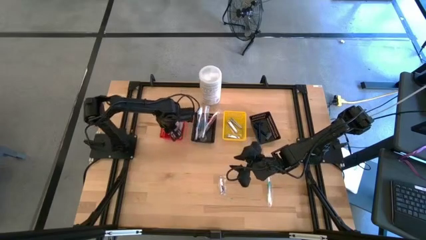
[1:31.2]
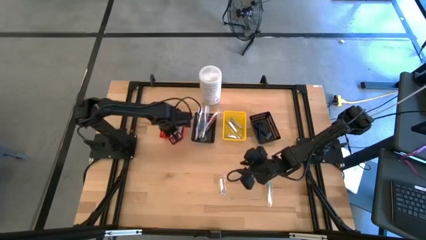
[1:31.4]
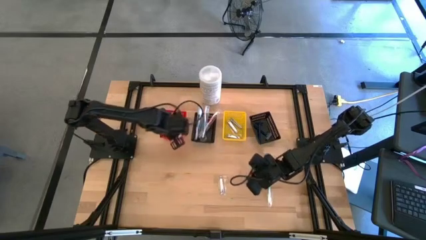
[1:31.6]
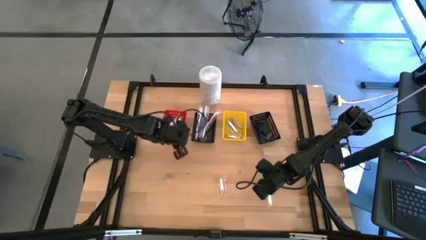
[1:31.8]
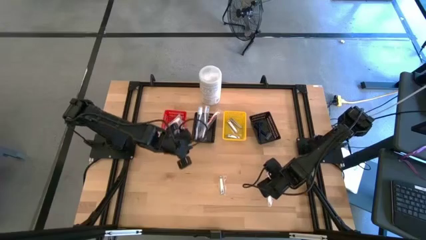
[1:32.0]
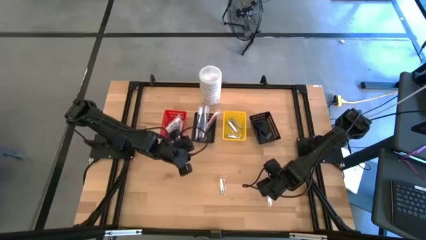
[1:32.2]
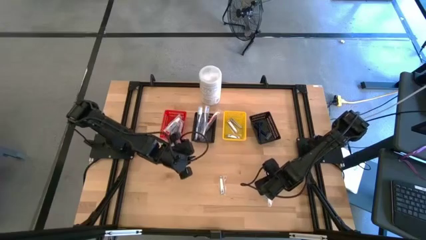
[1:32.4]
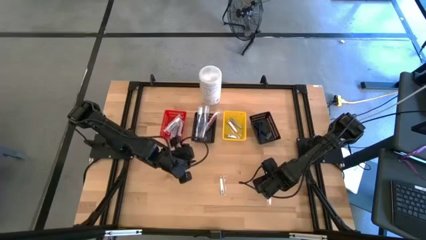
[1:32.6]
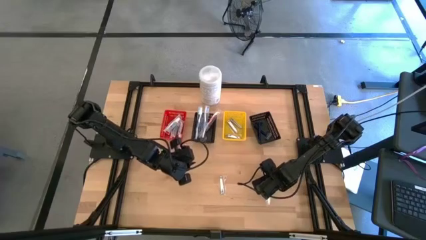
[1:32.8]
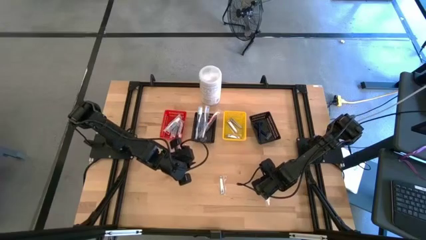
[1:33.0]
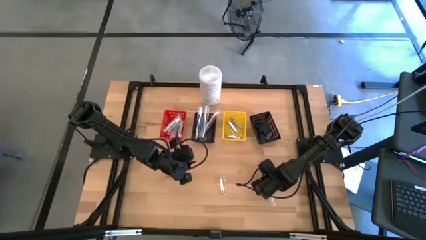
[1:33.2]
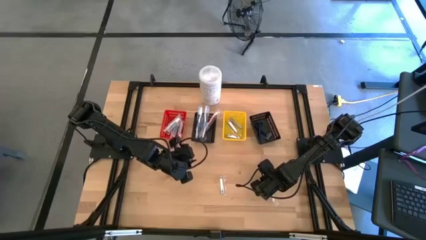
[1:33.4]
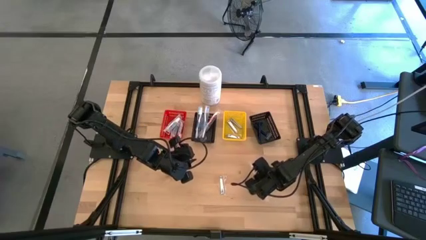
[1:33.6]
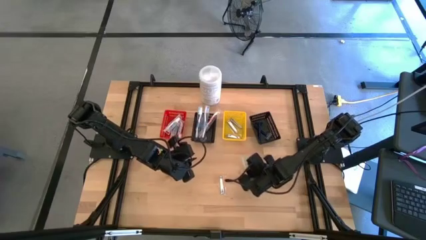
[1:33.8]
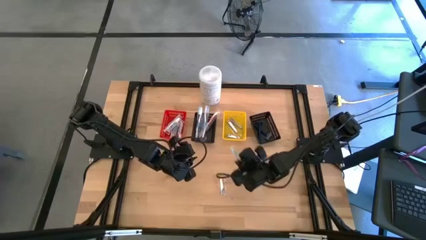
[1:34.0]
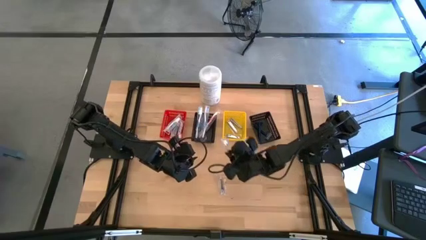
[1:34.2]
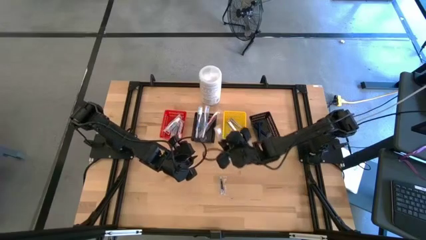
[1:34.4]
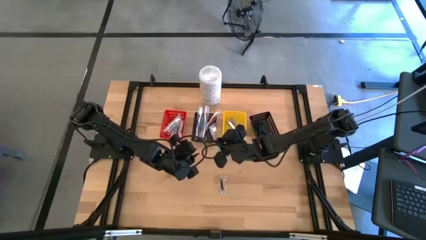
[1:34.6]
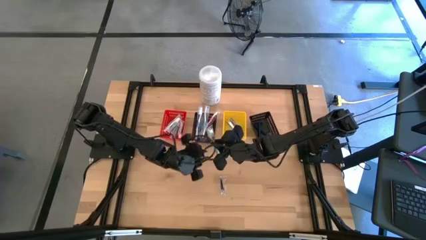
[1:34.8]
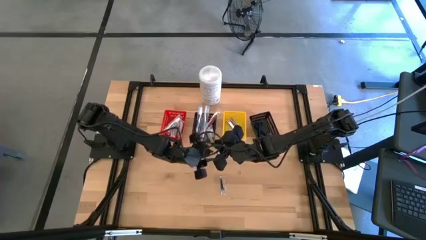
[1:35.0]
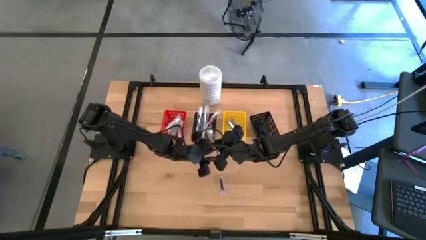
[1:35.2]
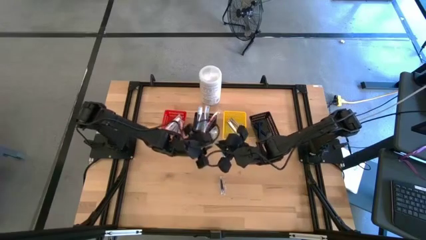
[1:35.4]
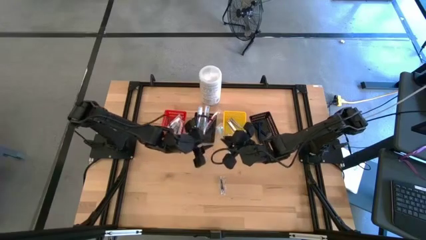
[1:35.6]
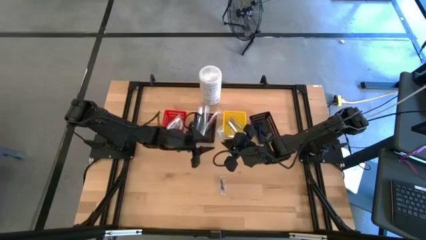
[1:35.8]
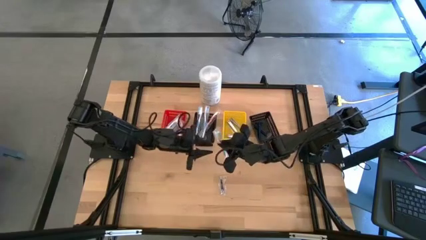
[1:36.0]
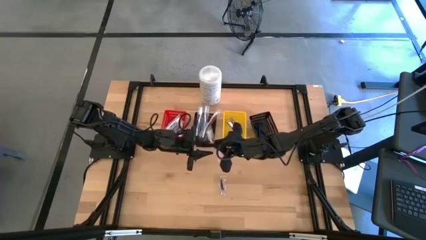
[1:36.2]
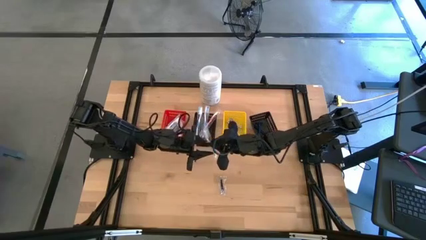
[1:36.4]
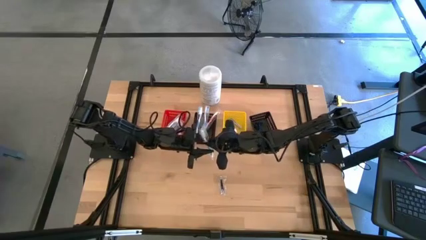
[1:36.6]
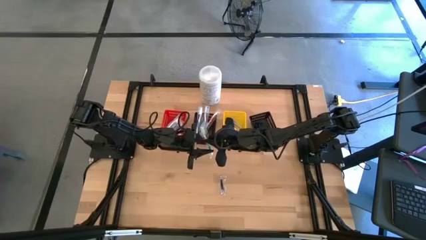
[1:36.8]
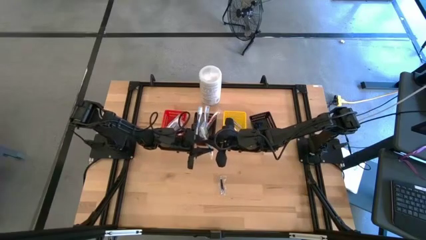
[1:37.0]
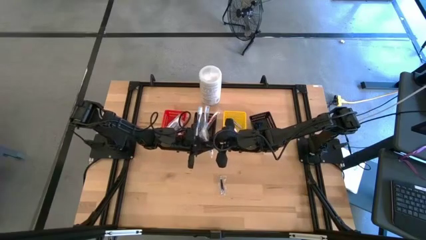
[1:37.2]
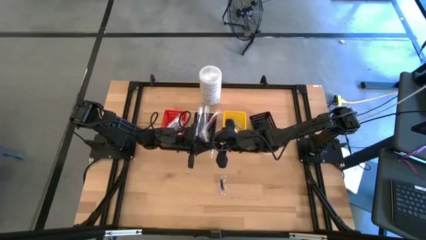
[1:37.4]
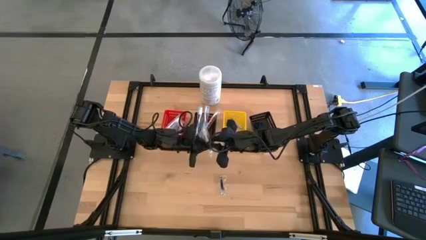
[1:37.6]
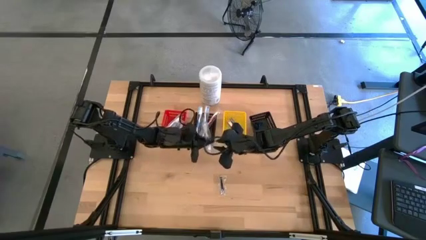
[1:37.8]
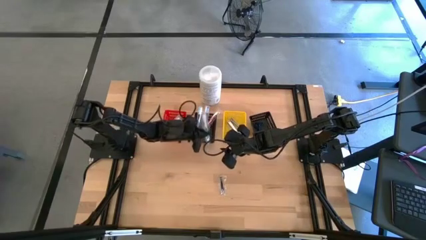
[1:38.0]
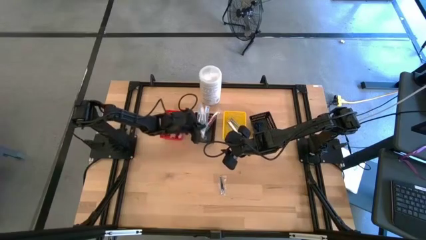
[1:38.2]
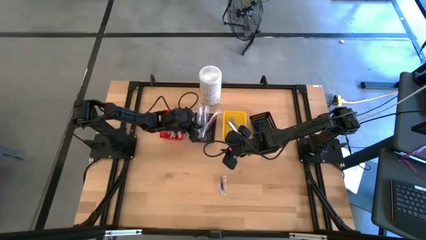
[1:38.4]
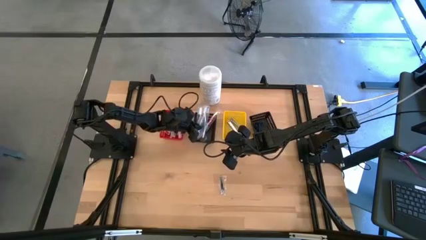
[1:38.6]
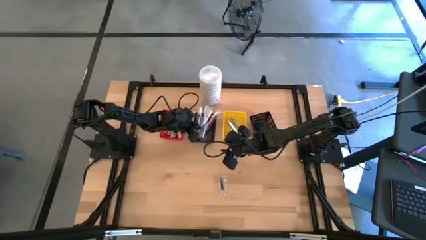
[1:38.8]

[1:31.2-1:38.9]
Task: Pick & Place Travel size toiletries
Put the green toothbrush into the left black basket

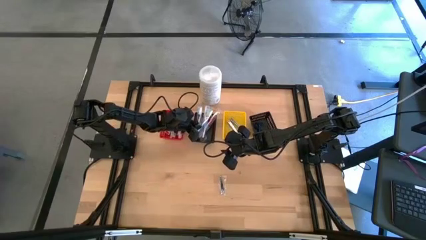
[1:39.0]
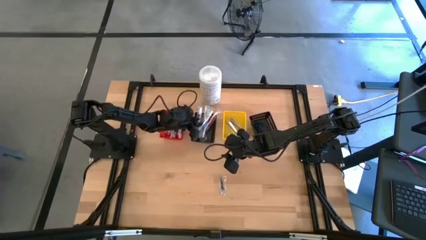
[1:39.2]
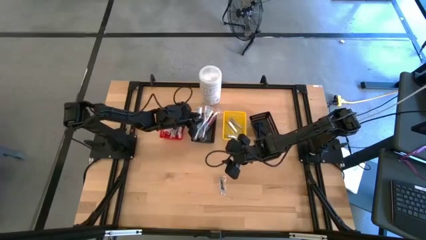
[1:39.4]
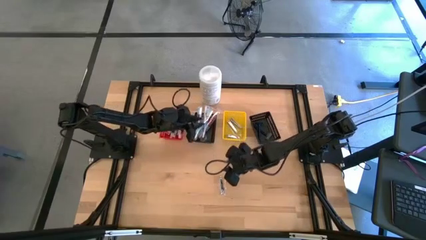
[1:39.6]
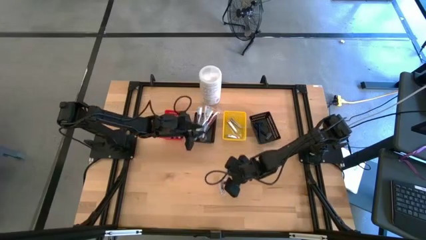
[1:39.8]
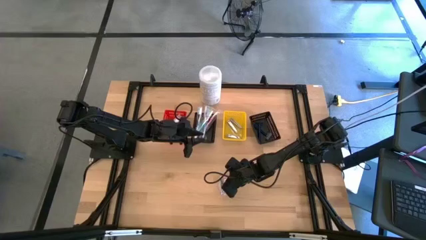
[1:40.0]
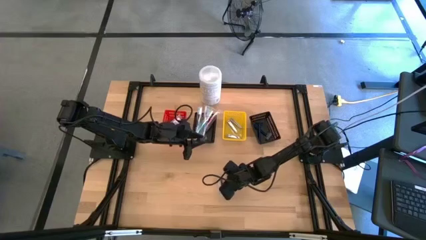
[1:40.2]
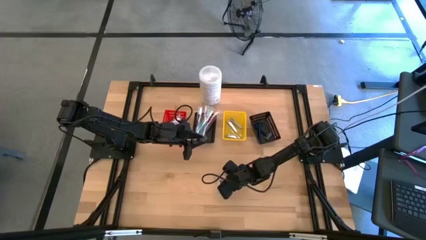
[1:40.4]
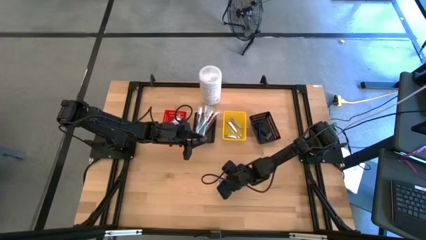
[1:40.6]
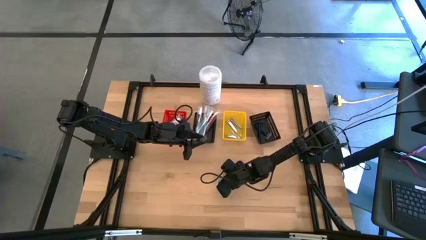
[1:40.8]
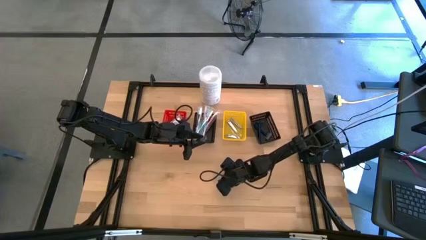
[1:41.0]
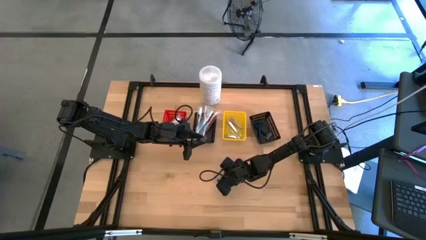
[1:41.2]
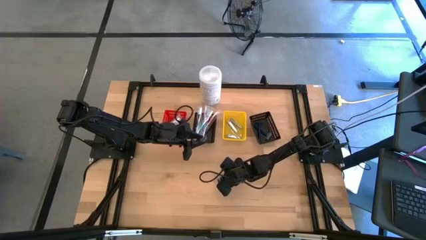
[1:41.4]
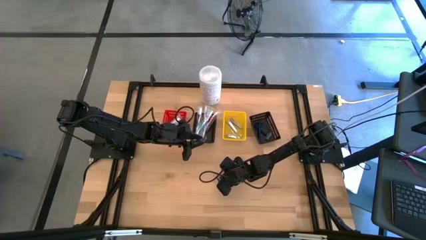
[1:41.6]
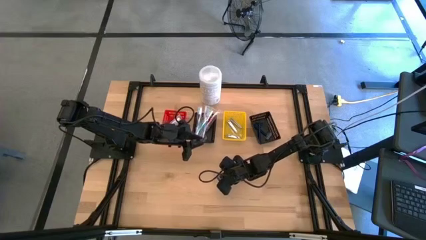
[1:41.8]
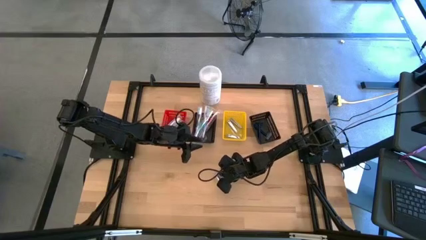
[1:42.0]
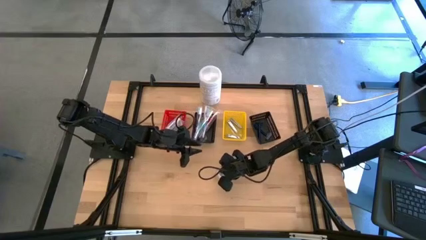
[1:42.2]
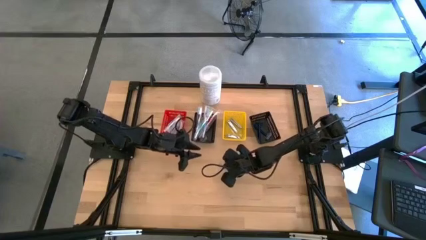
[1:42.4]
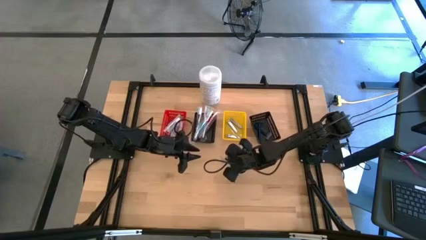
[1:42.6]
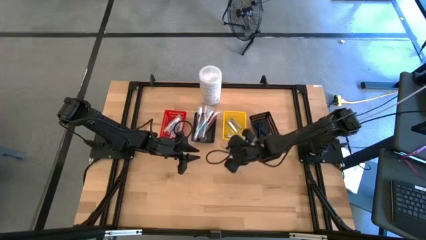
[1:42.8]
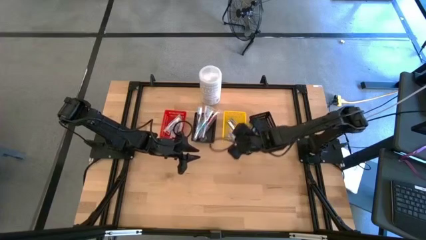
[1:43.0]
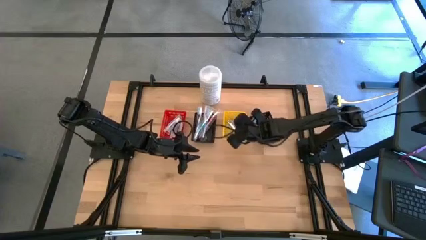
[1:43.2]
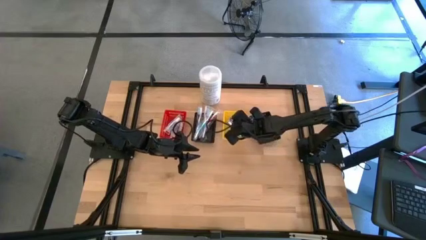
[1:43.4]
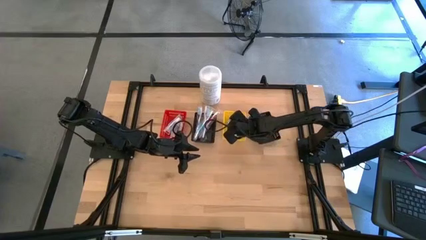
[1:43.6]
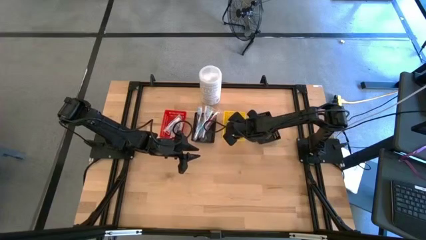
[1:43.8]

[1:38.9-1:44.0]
Put the nail cutter into the yellow basket

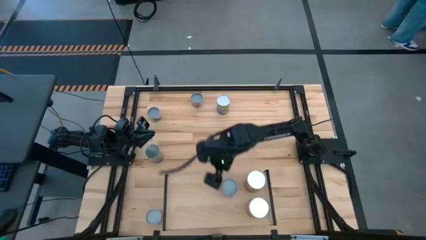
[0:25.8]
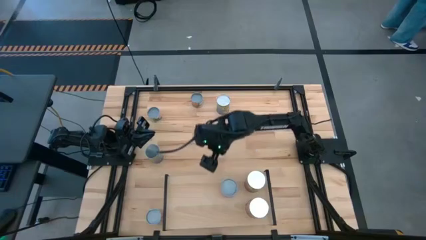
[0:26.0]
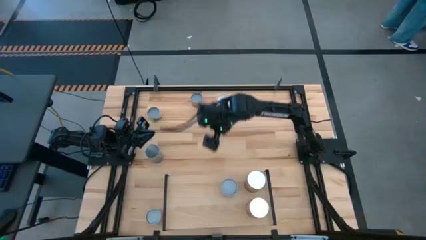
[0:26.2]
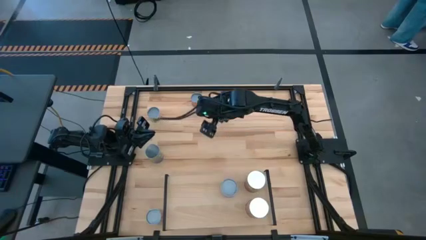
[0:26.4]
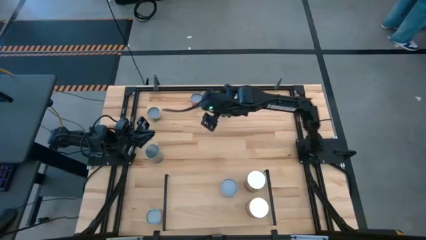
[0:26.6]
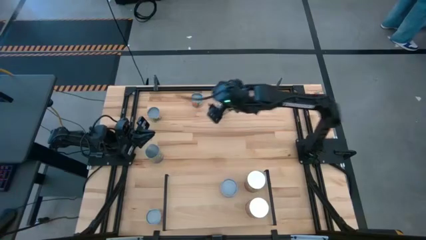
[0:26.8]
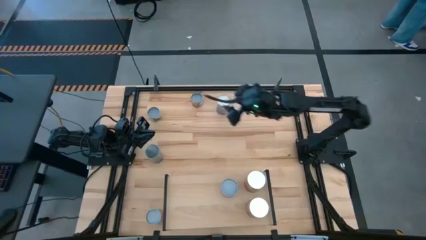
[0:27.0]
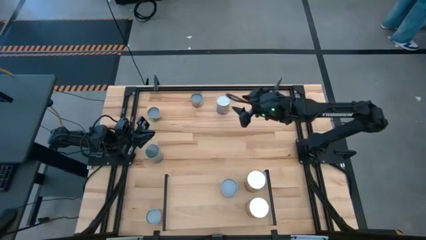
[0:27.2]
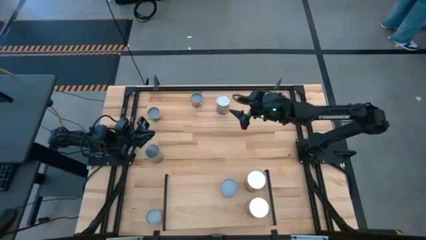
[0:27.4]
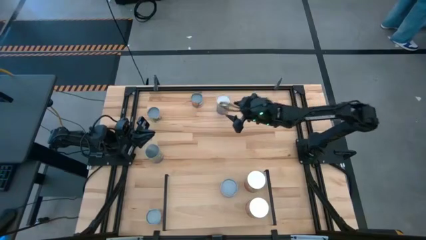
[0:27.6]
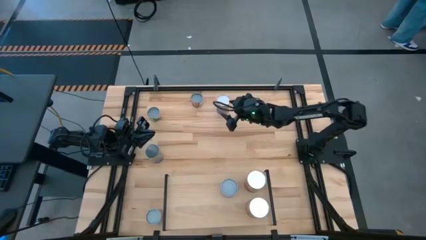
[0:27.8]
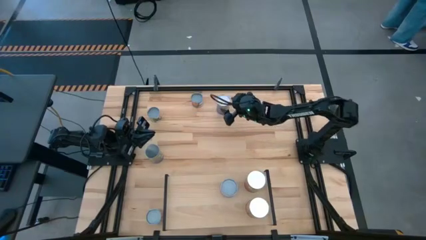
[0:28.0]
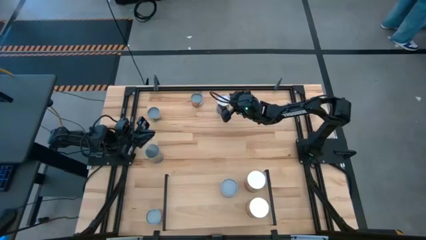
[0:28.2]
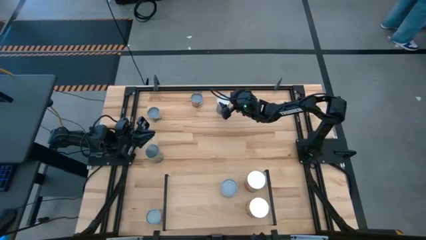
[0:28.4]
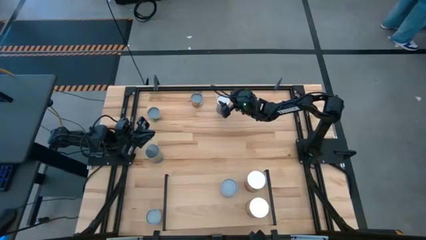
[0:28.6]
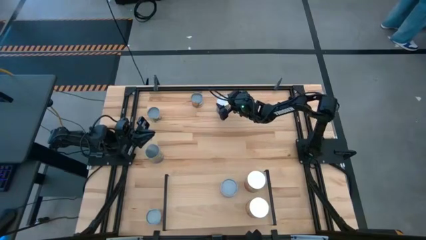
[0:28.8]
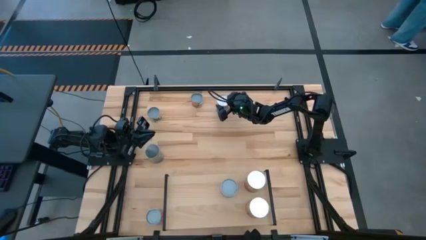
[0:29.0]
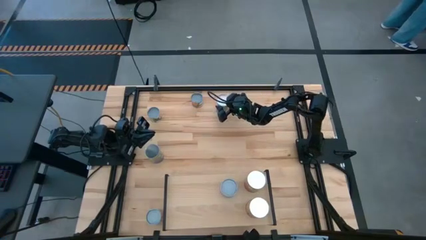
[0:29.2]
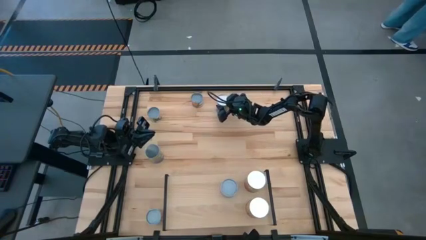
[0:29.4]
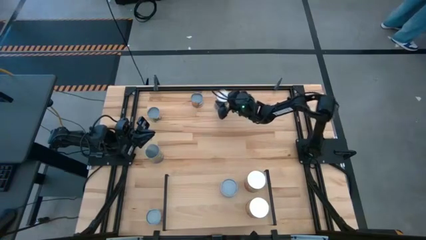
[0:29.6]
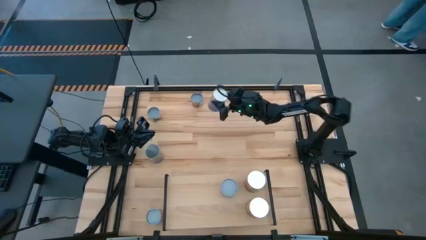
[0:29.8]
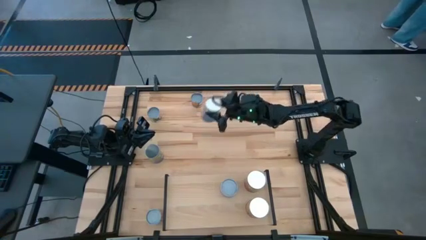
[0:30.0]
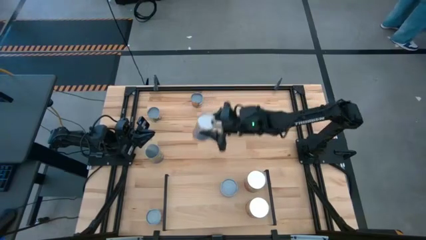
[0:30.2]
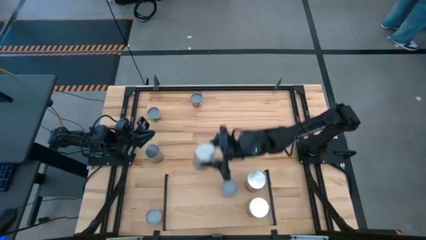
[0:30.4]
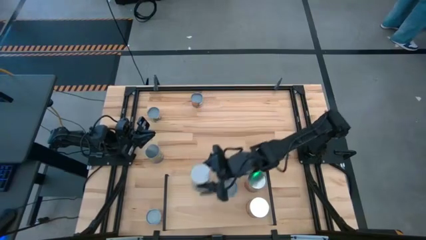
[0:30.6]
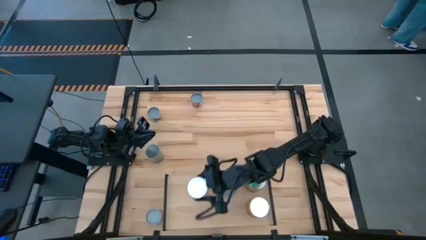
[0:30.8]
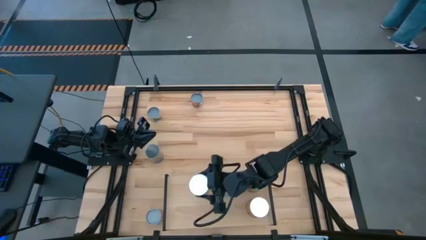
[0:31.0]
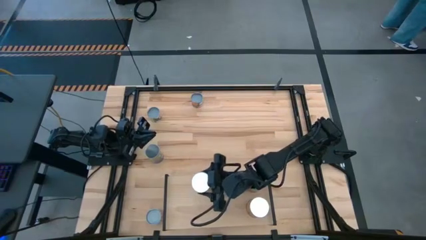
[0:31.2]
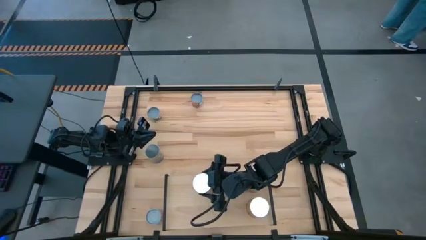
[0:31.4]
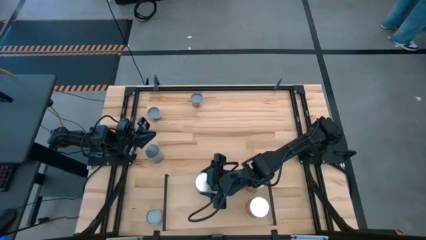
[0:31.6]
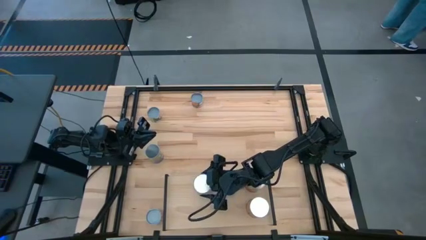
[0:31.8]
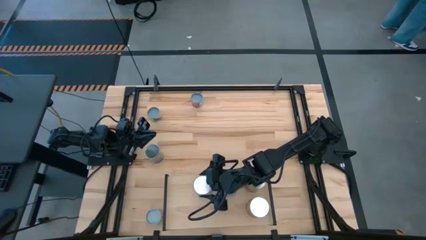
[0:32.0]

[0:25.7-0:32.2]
Task: Pick and place cans onto a shelf
Put the top large canned peaches on the shelf
